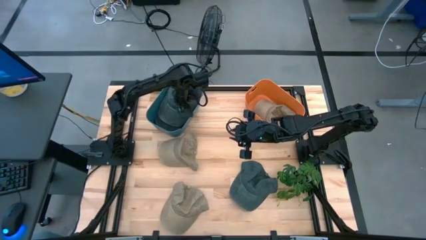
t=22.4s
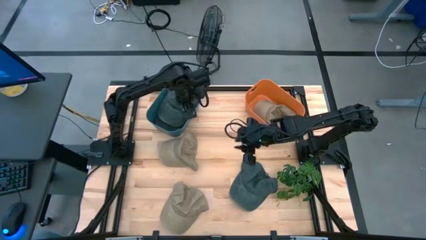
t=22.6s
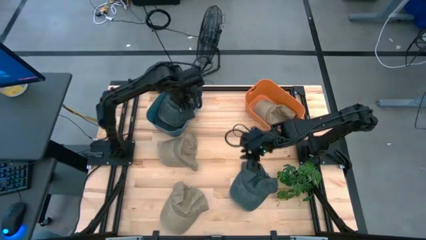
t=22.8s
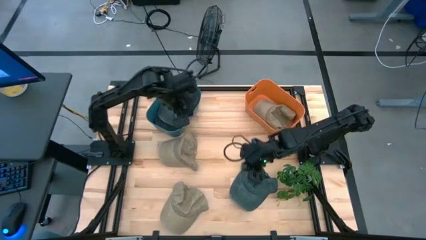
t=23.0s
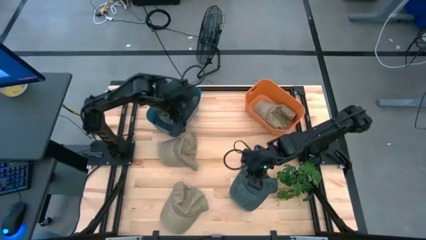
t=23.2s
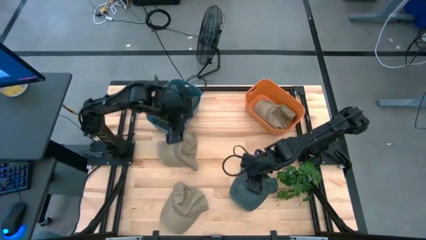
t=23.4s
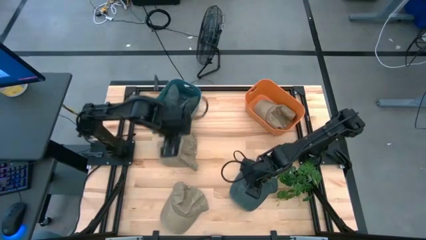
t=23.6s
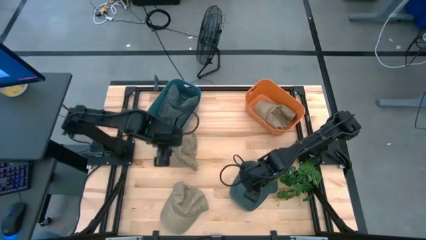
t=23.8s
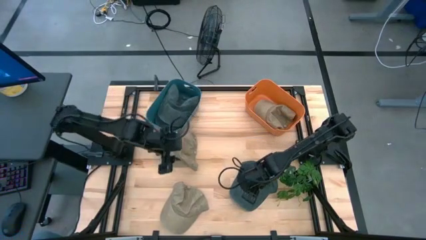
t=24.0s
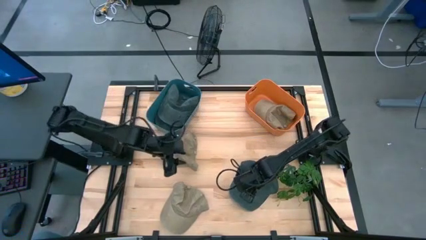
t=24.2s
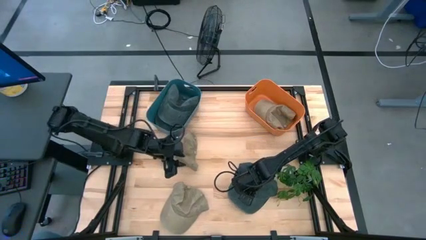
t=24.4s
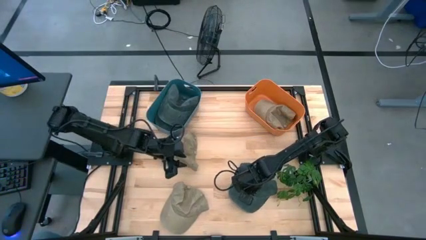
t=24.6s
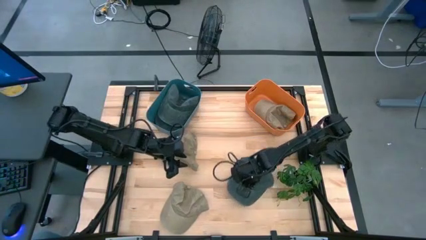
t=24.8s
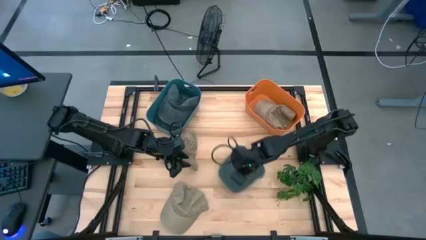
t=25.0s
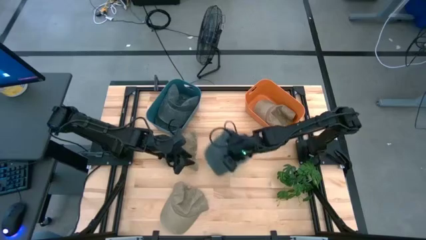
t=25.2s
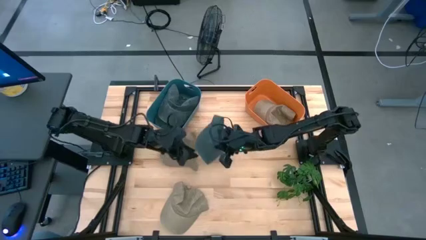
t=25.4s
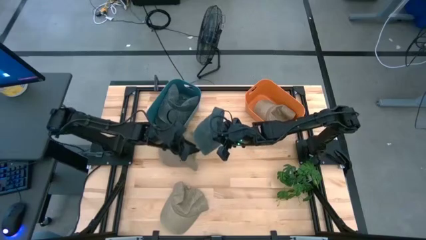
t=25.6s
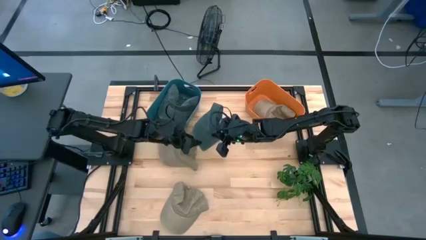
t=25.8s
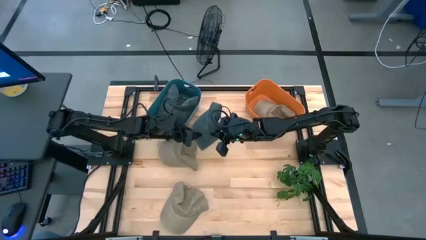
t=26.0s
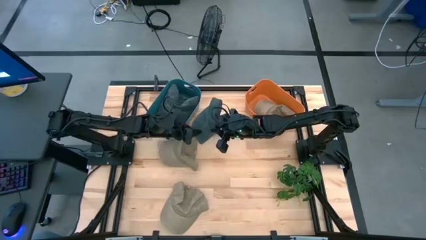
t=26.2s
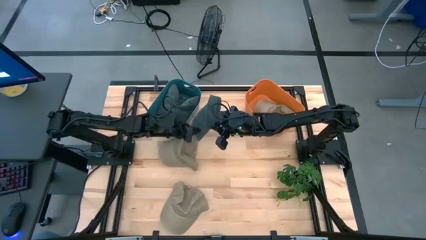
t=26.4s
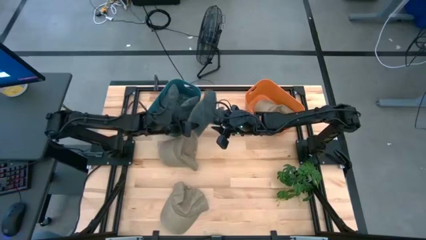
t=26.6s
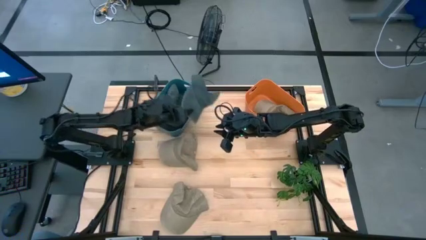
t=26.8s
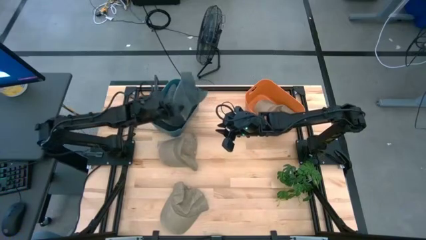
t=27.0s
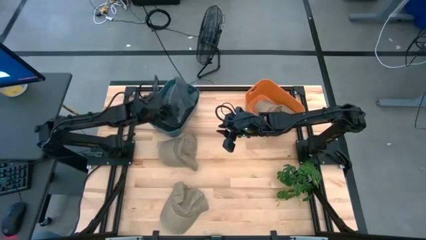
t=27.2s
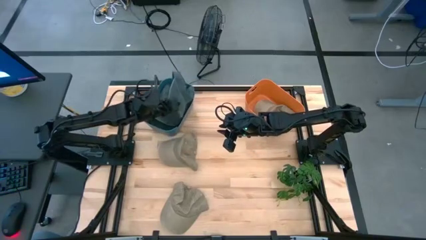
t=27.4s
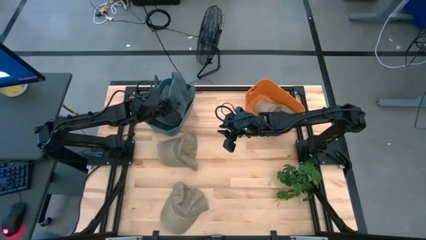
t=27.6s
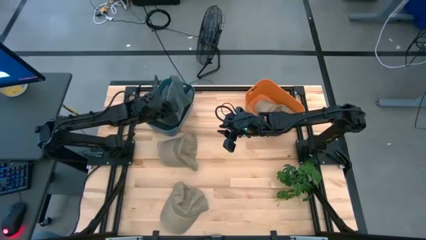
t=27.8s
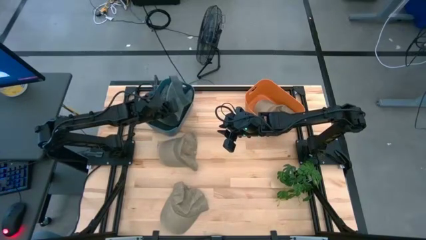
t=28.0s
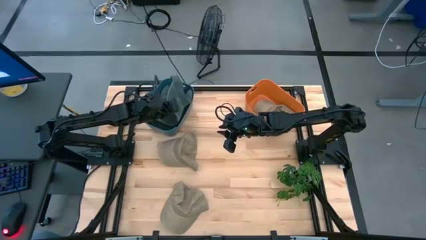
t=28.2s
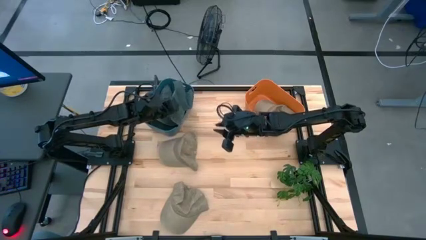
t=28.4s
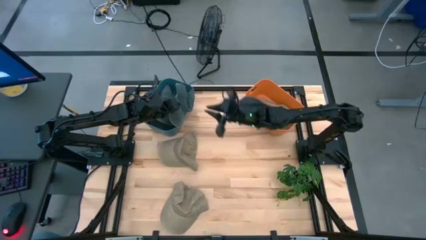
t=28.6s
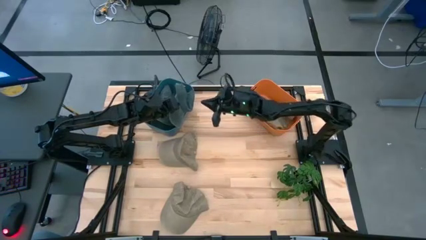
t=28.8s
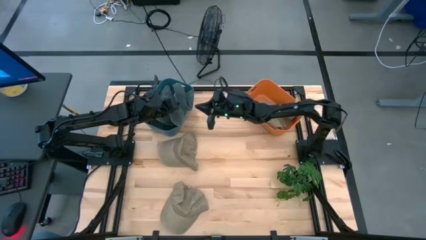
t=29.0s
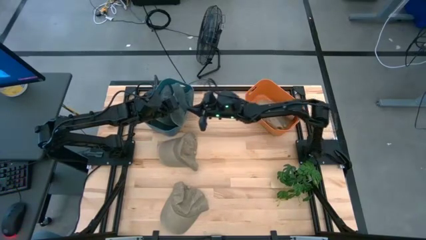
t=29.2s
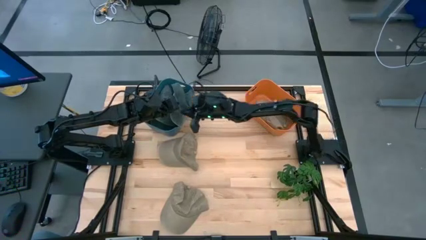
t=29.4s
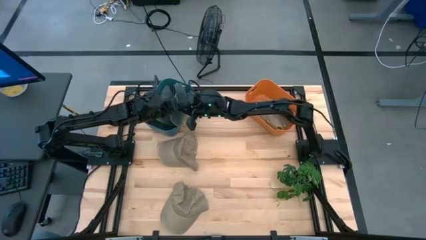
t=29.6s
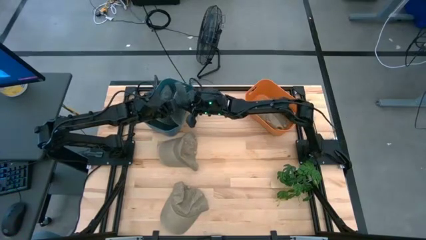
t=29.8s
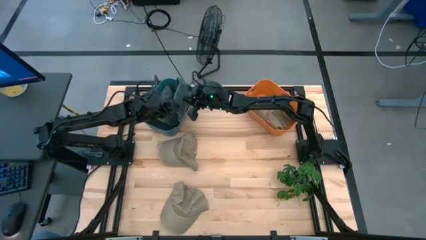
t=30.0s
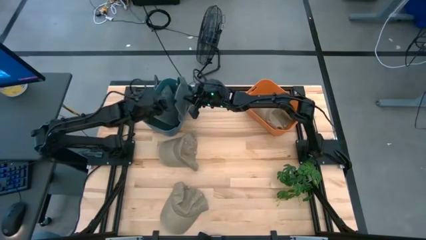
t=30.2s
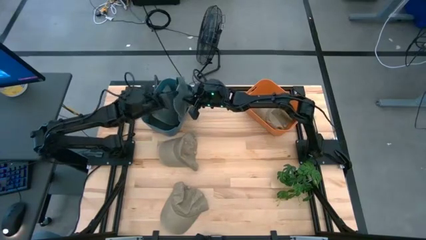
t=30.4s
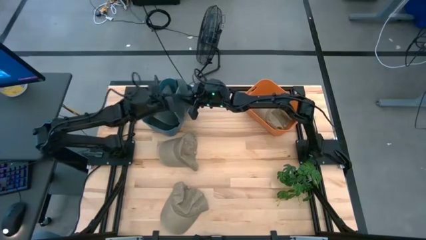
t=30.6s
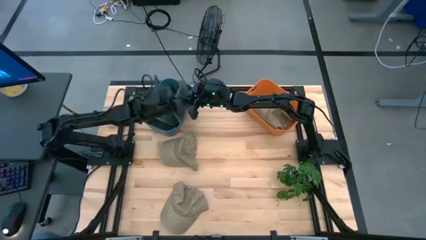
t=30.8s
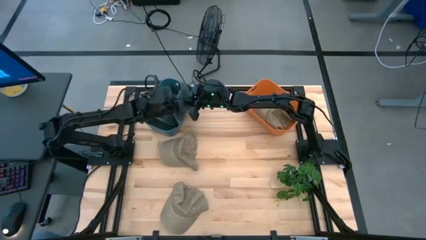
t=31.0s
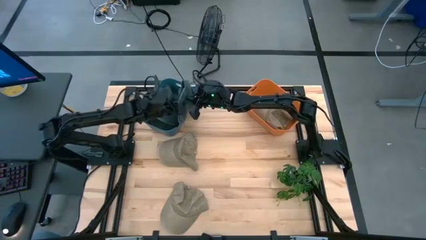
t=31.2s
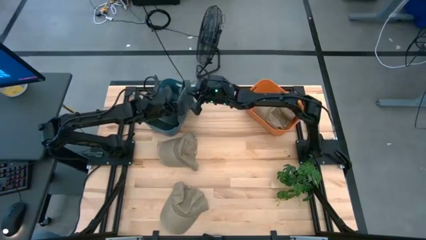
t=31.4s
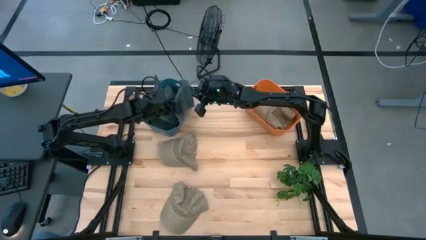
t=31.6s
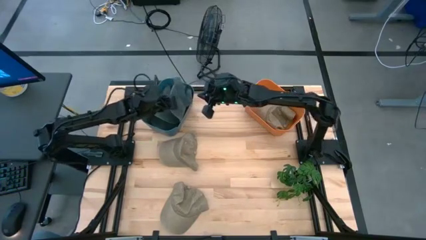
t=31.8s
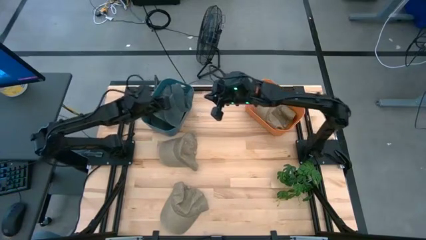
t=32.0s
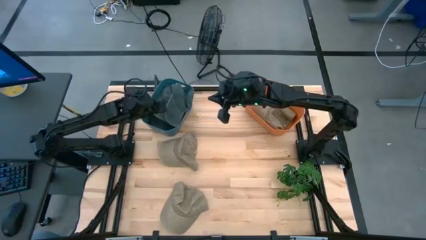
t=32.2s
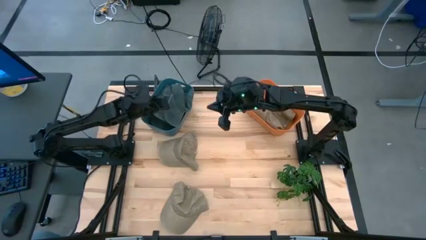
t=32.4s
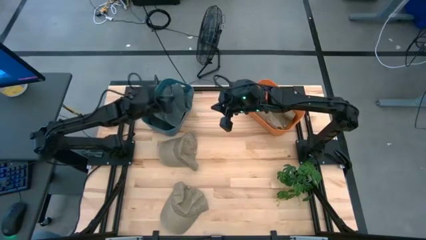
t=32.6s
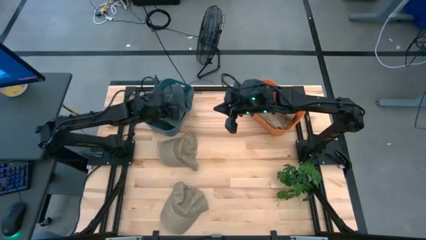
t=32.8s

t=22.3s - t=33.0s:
Task: Pick & Place hat
Put the blue cap into the blue bin

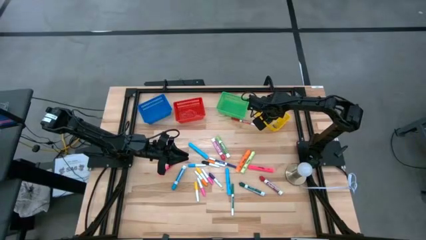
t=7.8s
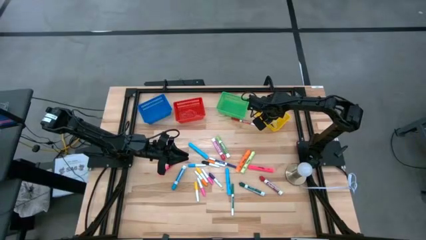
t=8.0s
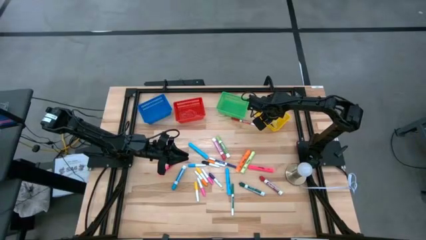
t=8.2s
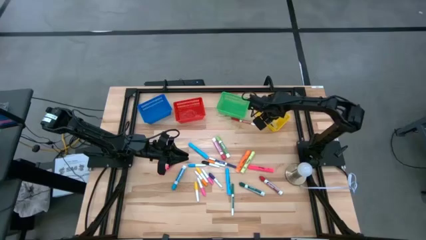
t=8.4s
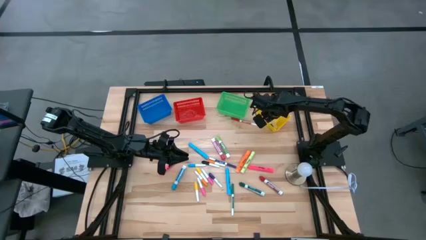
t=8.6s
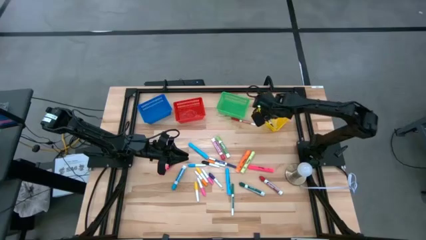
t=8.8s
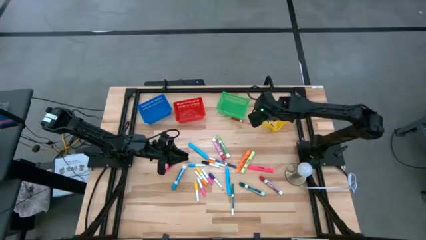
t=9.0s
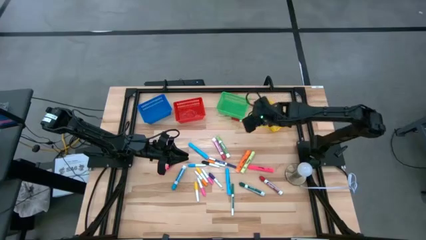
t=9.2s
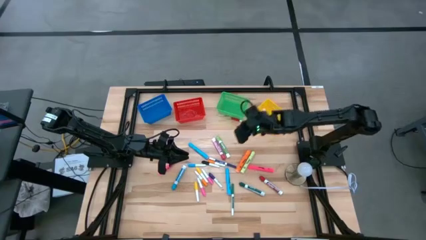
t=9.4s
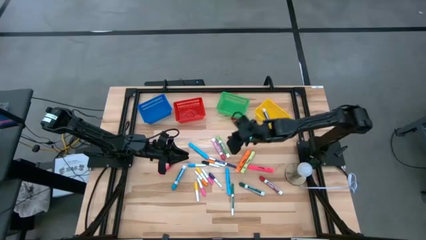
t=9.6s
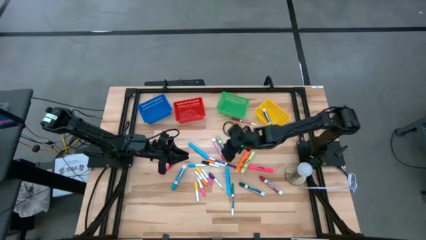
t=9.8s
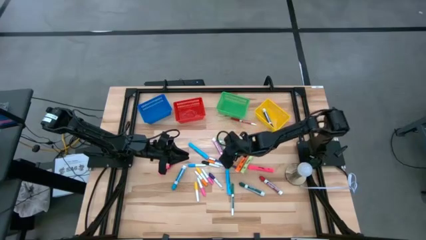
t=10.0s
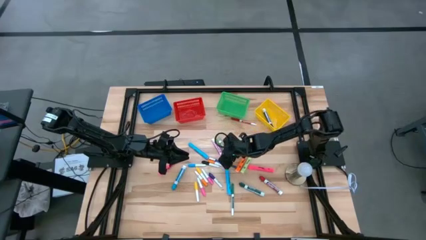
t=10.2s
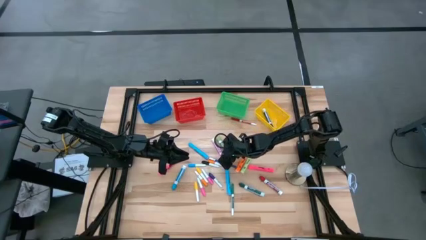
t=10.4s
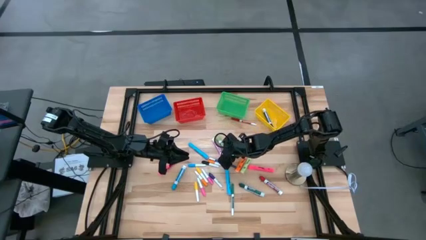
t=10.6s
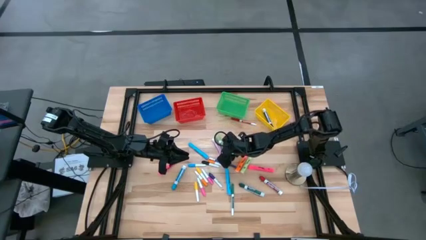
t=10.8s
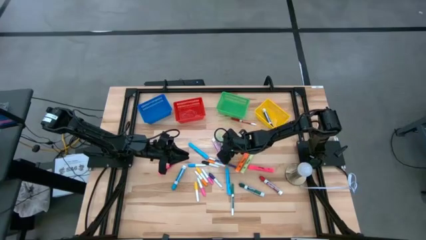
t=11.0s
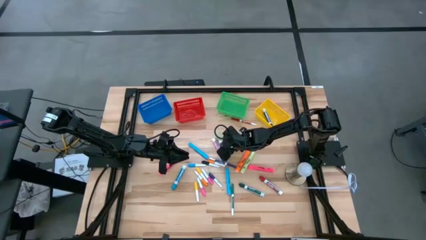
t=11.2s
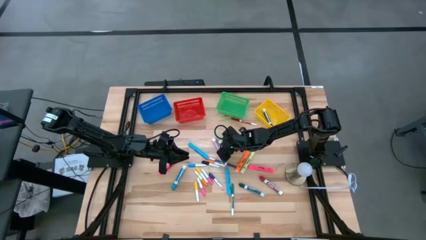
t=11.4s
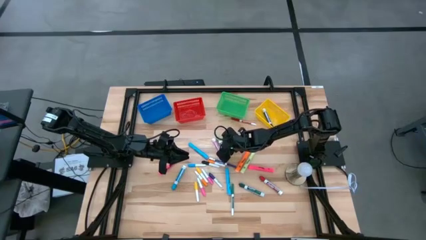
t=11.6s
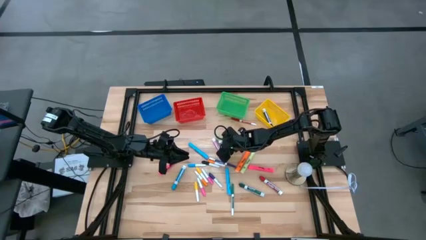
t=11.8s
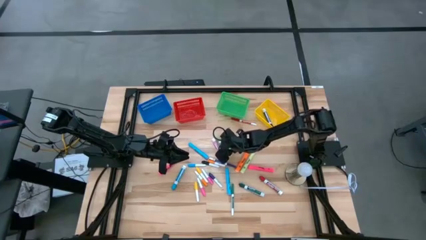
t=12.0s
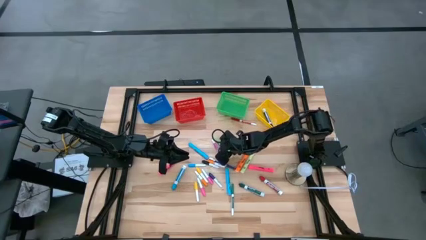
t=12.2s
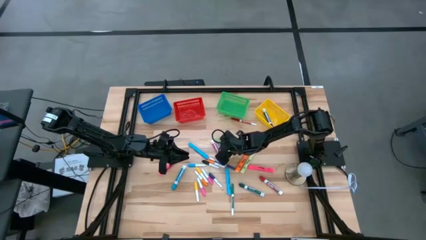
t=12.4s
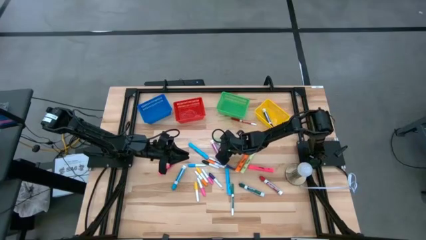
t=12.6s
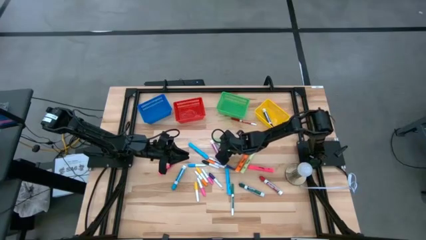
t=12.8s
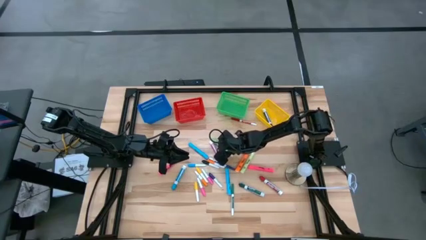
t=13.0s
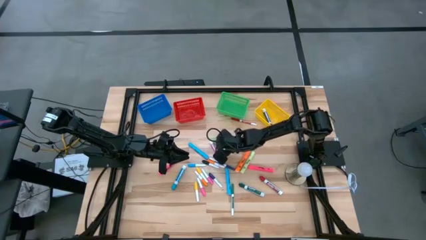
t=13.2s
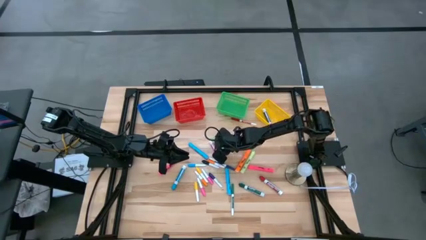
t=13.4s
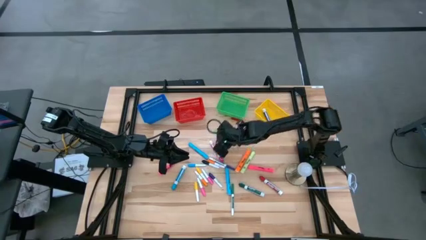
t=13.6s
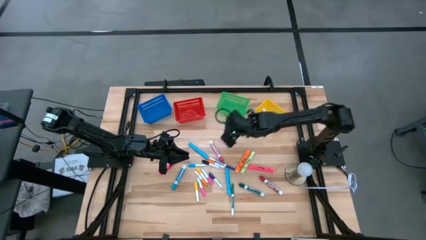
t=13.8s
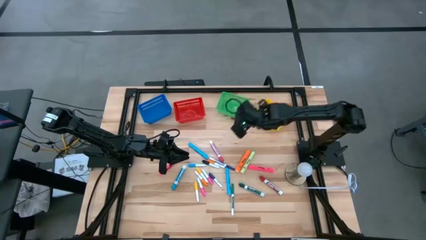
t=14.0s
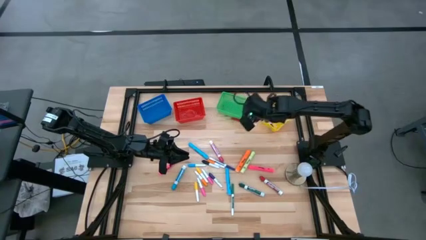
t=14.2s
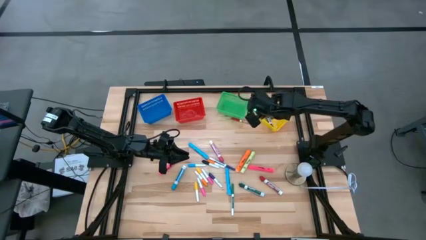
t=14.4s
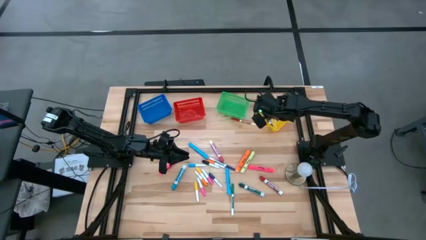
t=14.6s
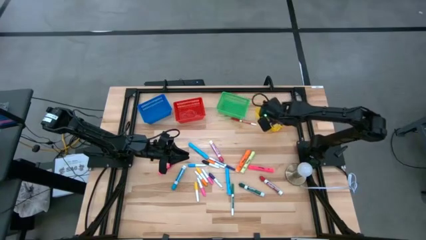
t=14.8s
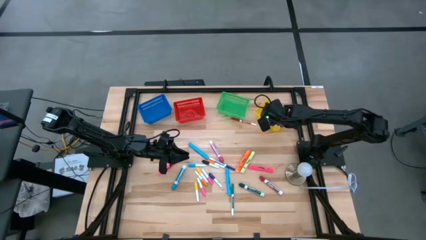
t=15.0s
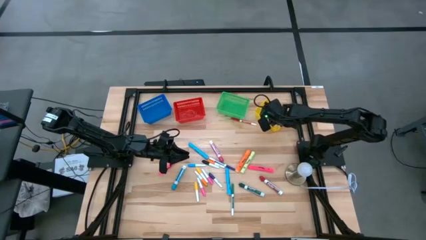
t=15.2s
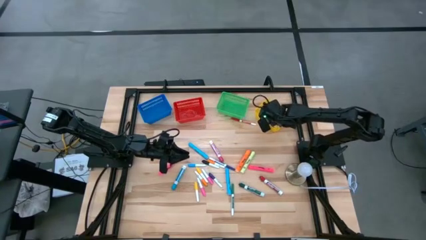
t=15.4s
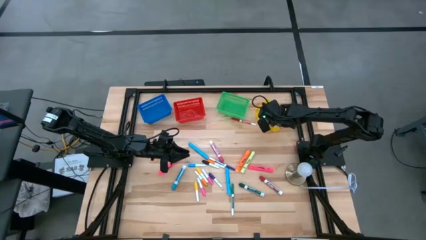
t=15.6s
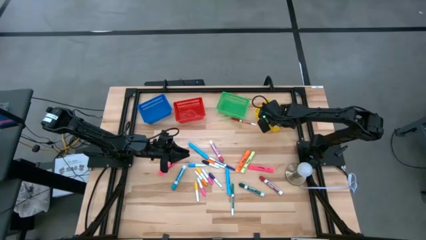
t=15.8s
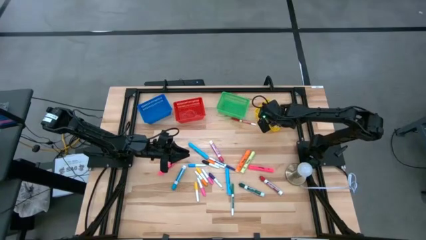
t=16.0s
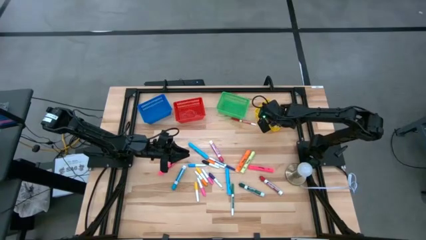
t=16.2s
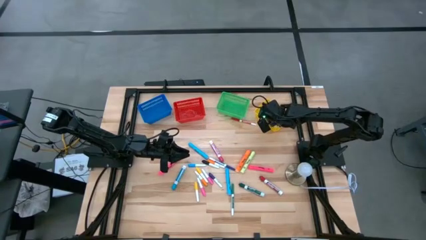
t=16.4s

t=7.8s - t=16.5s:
Task: Pick & Place Markers
Put the large light green marker pen into the yellow bin
